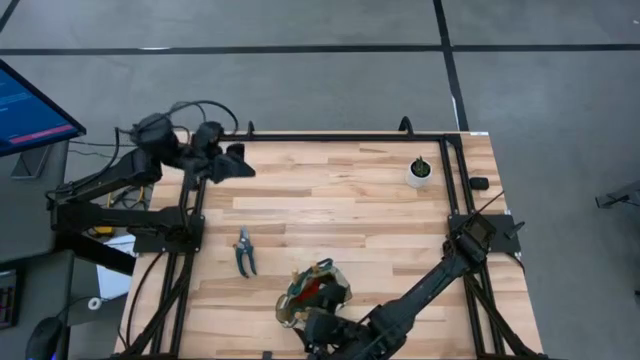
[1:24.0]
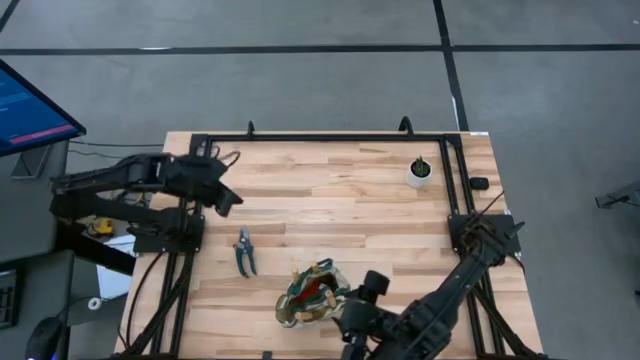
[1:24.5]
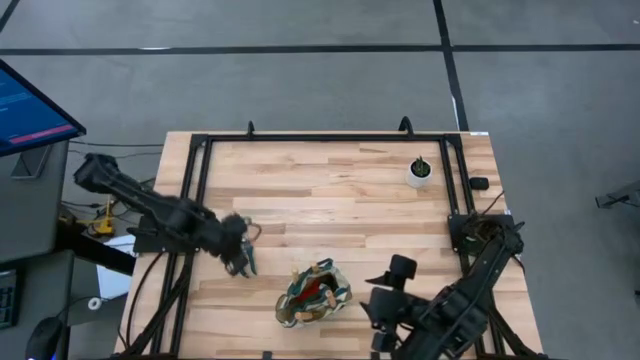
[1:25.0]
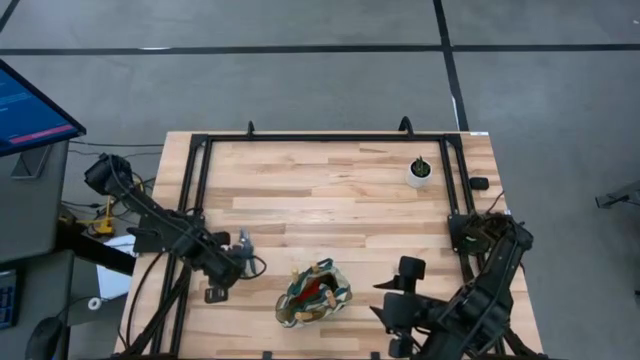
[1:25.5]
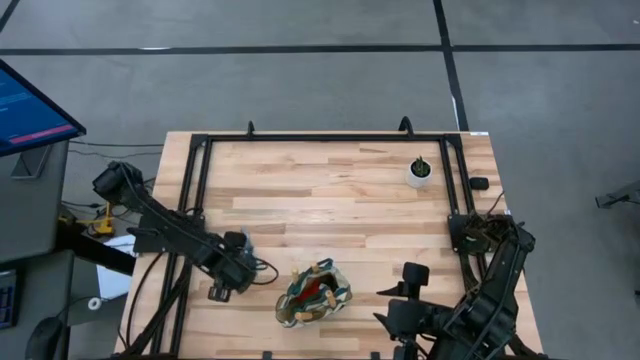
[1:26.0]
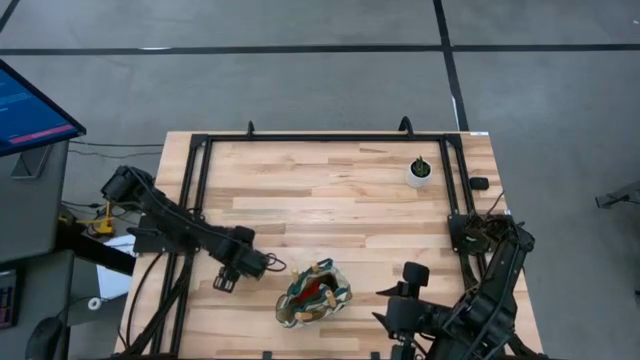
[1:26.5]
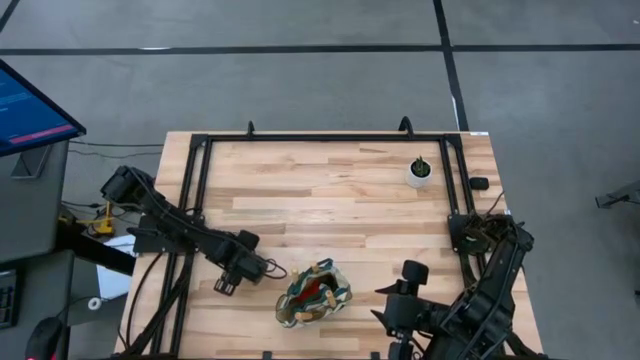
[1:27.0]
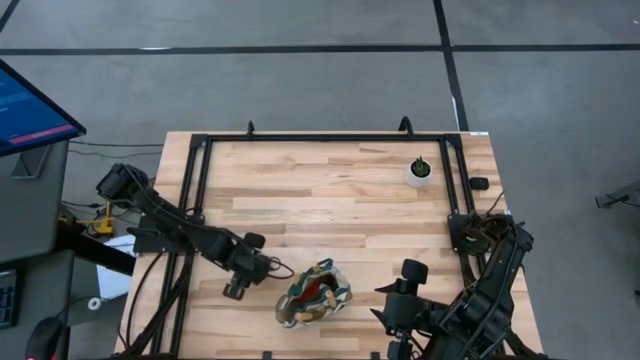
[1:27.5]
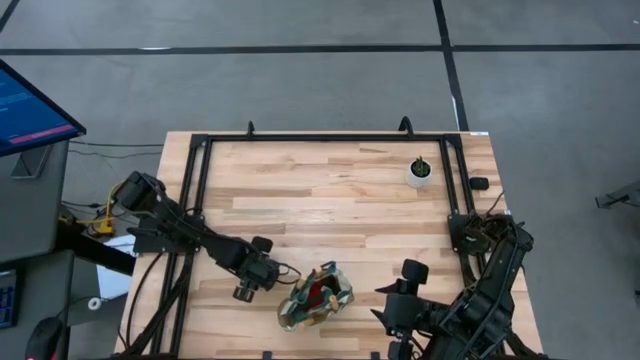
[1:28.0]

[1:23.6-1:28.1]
Task: Pick & Place Garden tools in Gardening bag
Put the green shear scissors into the gardening bag pocket

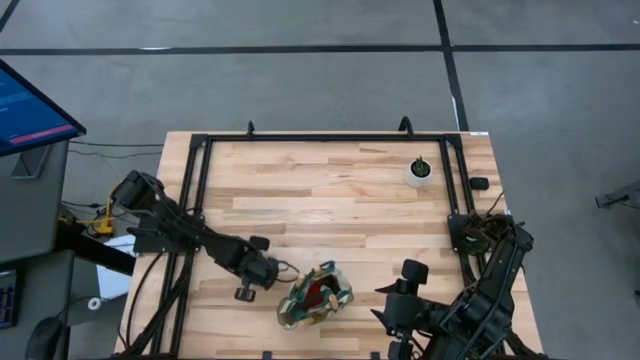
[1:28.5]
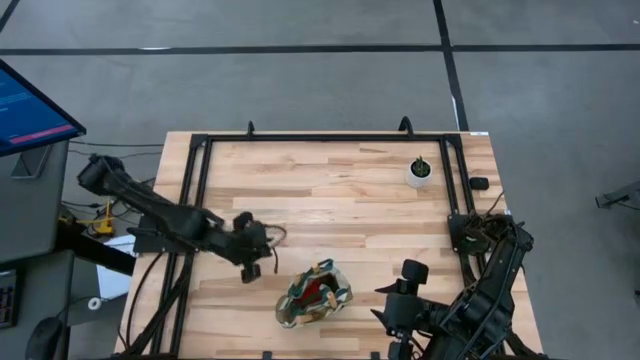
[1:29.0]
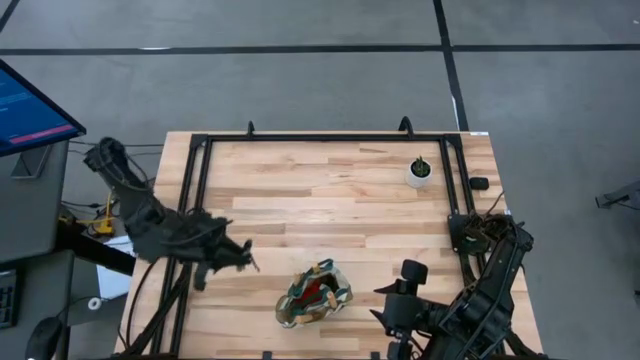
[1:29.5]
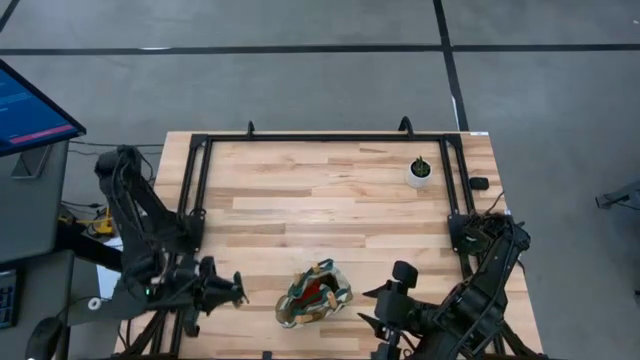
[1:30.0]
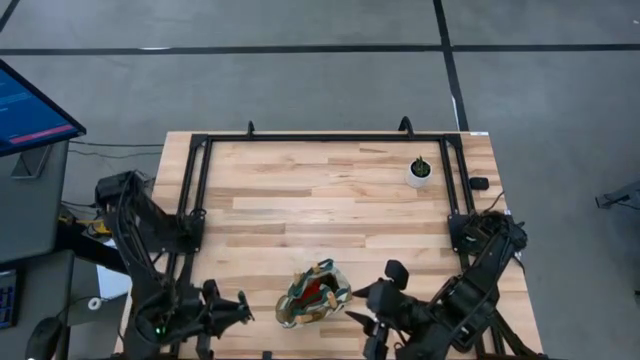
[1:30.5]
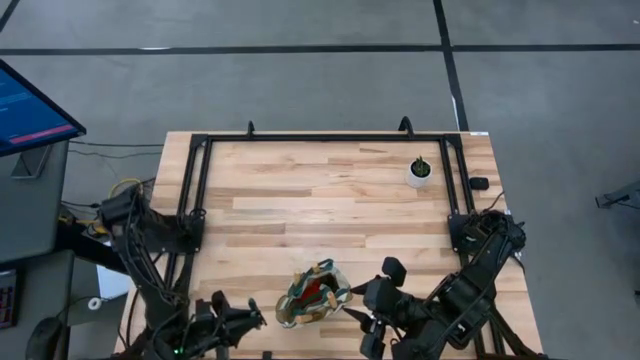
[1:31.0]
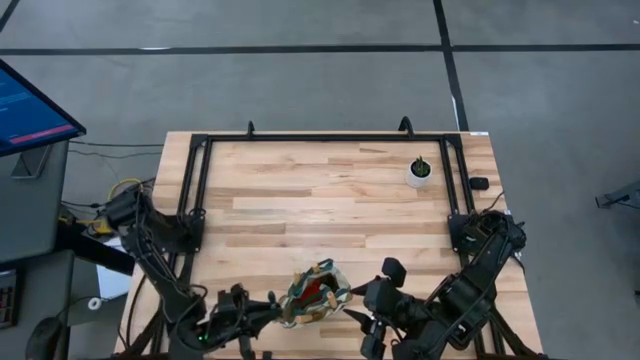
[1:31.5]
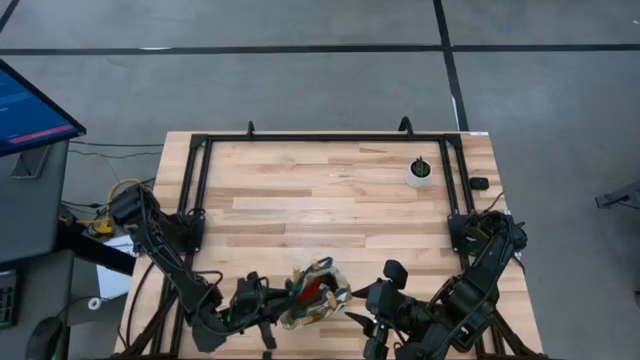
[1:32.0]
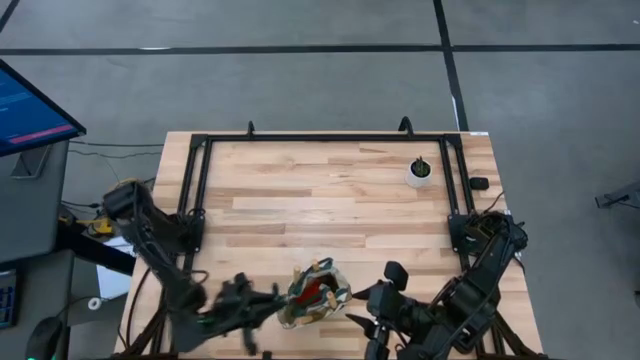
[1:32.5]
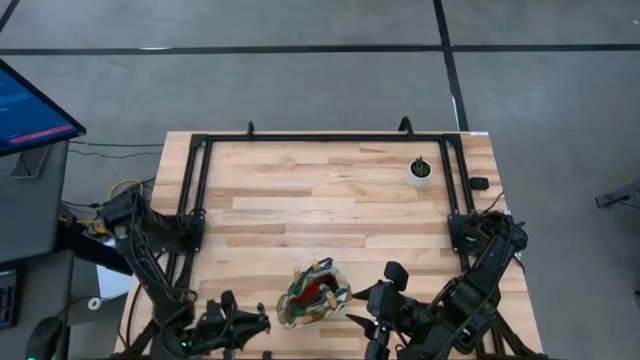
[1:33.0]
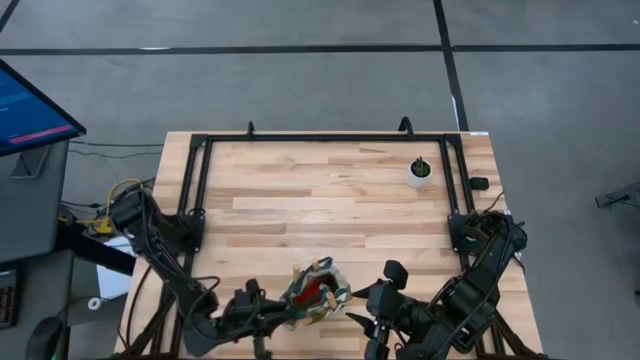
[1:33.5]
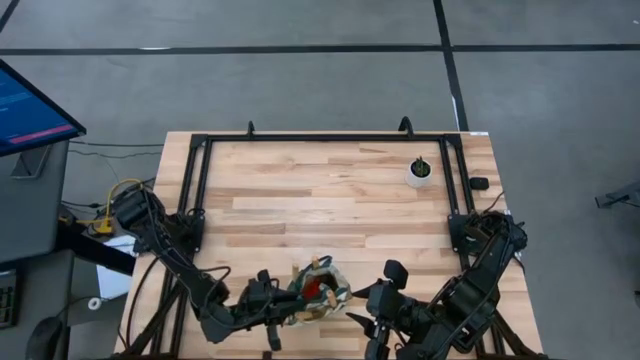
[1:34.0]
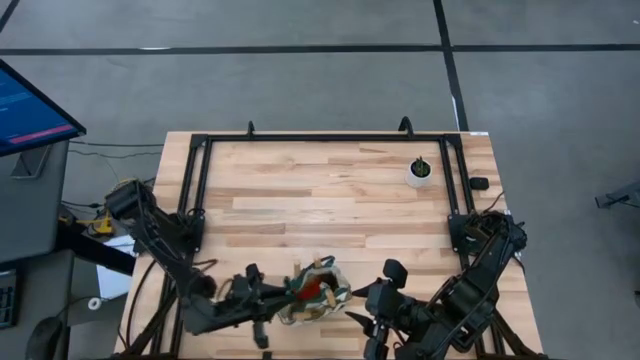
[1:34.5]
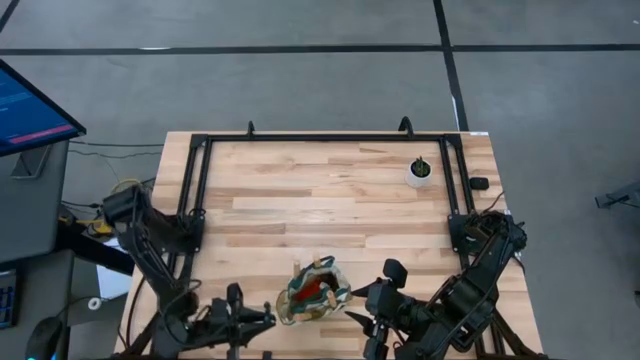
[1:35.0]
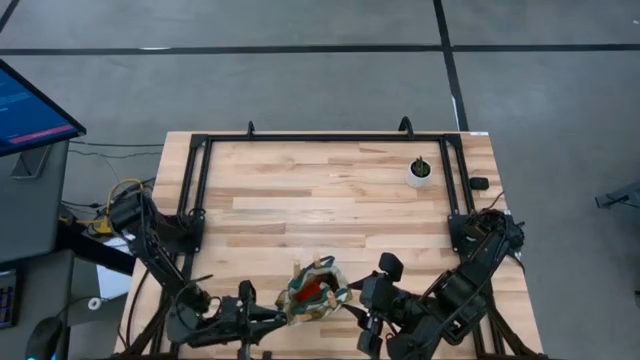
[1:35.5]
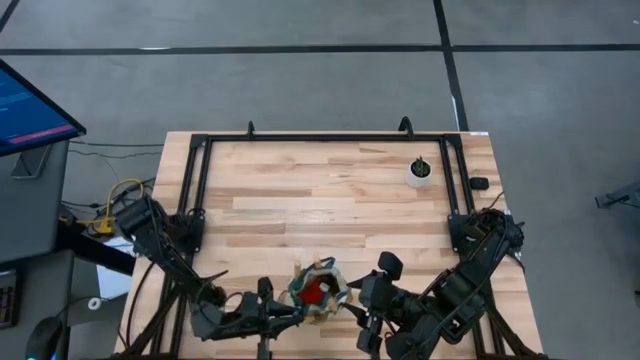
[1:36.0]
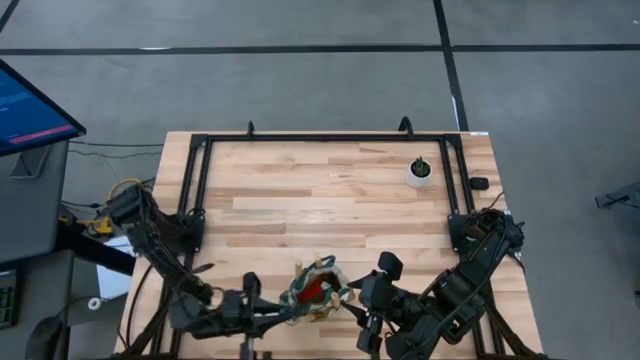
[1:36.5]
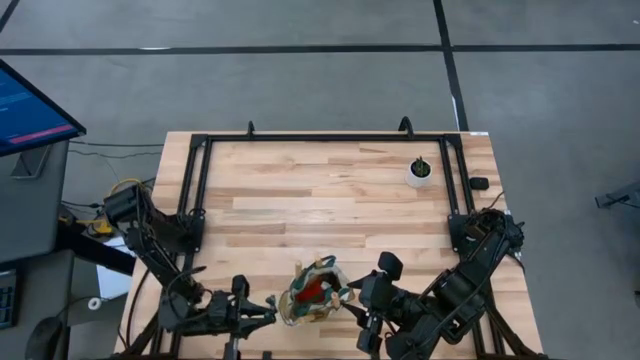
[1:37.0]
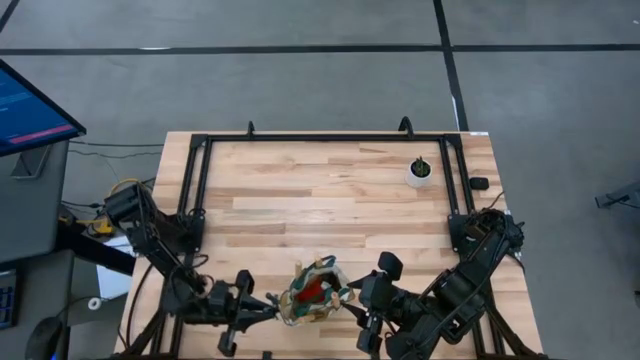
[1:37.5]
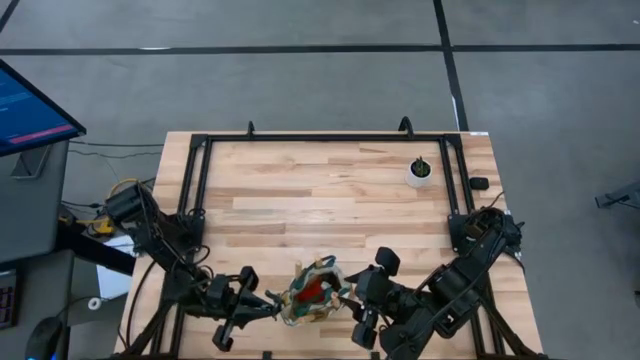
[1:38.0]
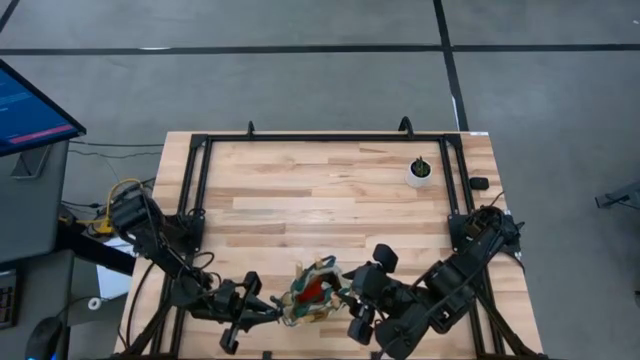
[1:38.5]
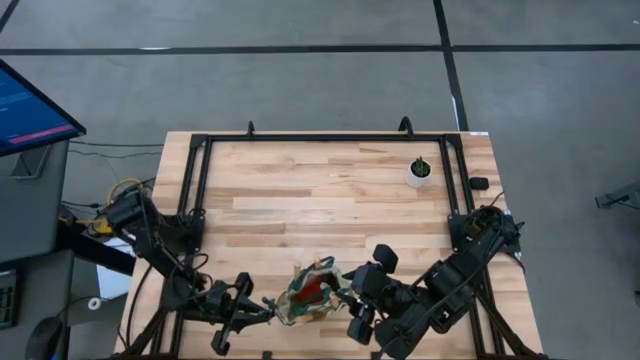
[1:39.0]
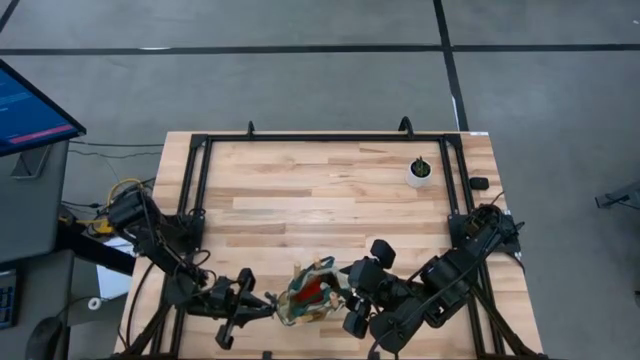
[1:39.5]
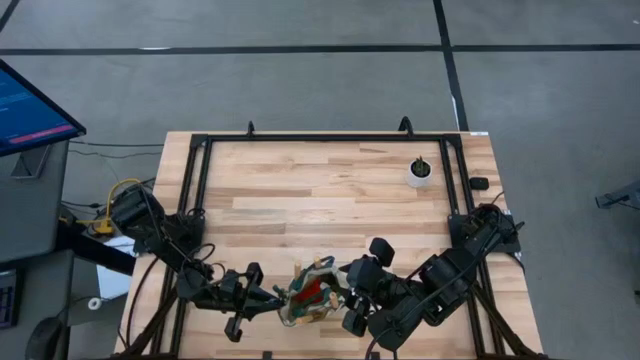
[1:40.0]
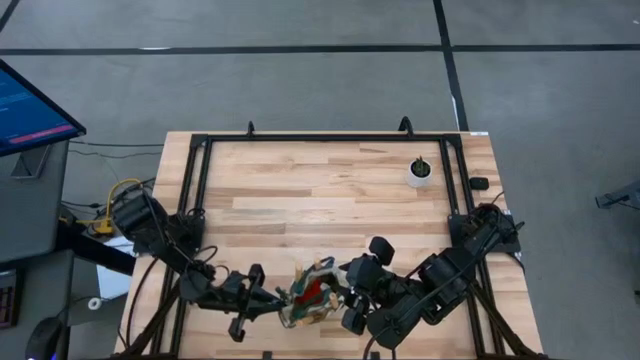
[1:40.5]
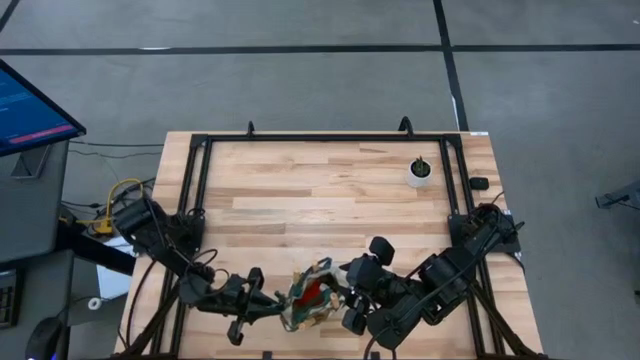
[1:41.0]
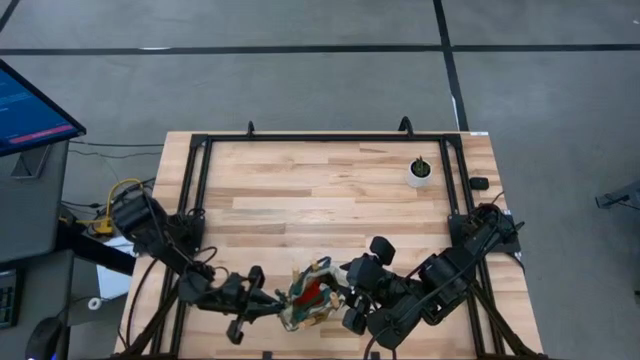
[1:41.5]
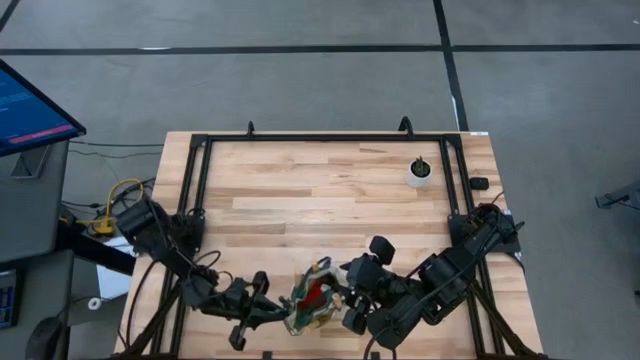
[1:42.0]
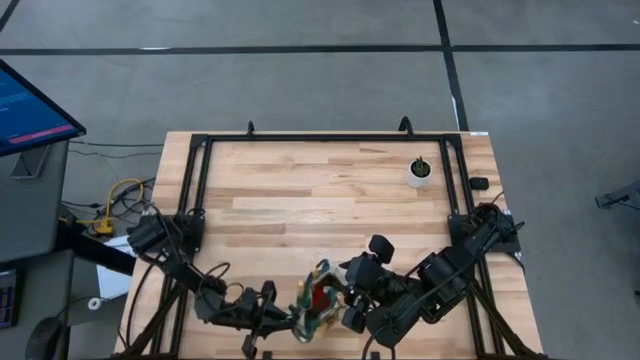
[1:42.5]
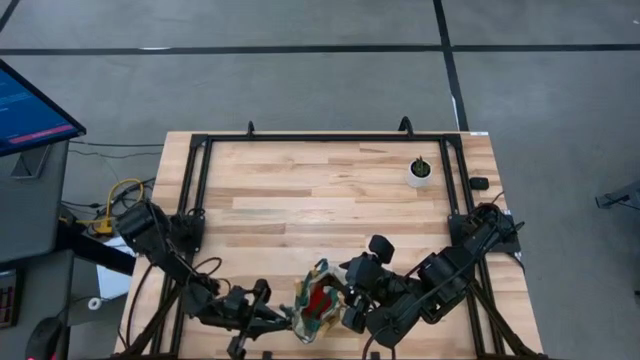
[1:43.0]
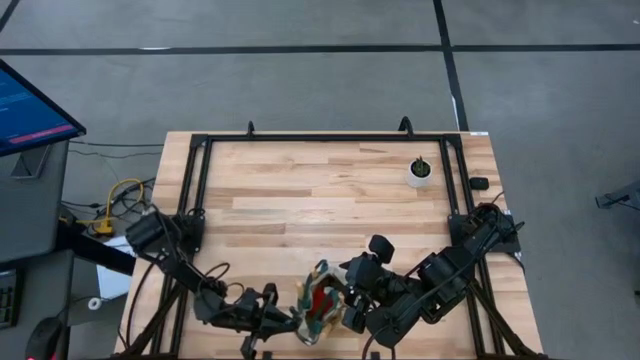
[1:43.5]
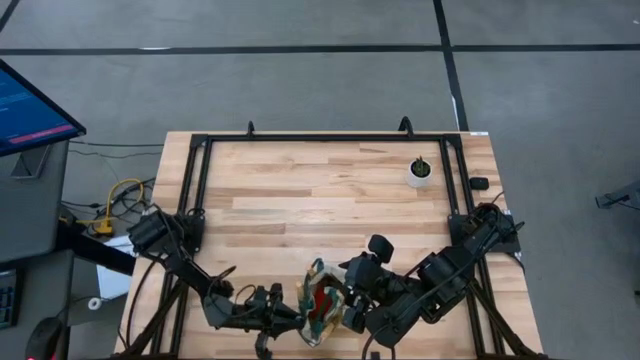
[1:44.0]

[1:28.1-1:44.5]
Put the green shear scissors into the gardening bag pocket

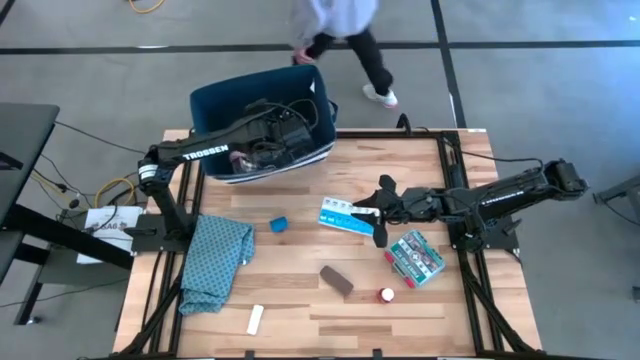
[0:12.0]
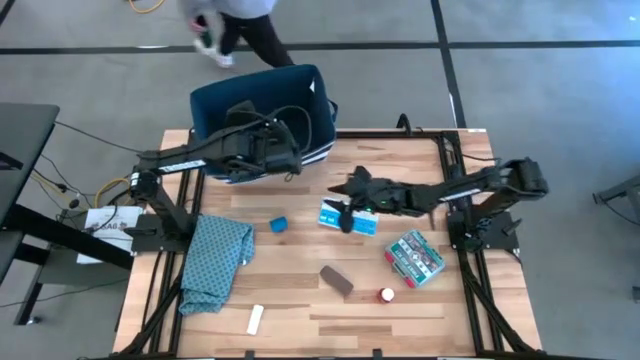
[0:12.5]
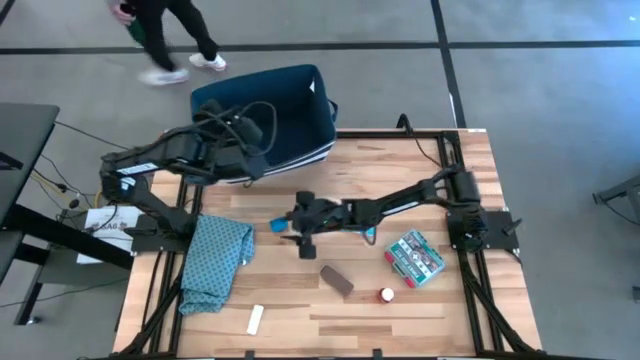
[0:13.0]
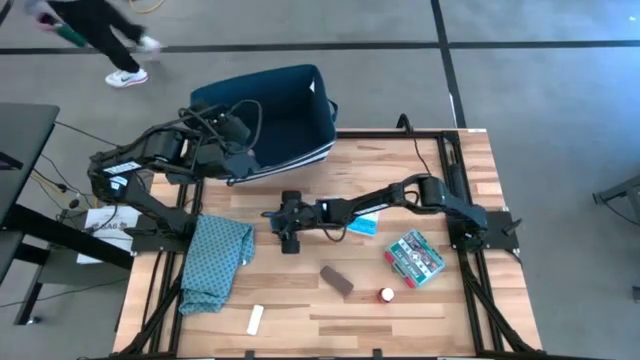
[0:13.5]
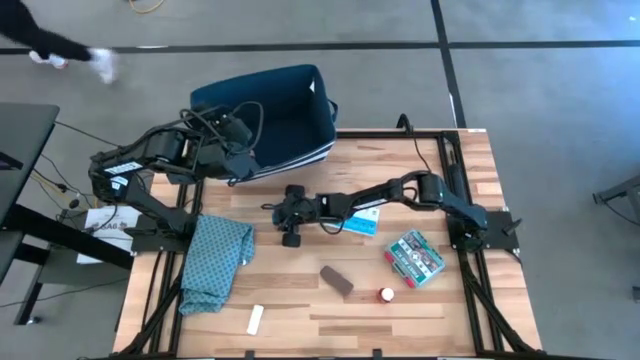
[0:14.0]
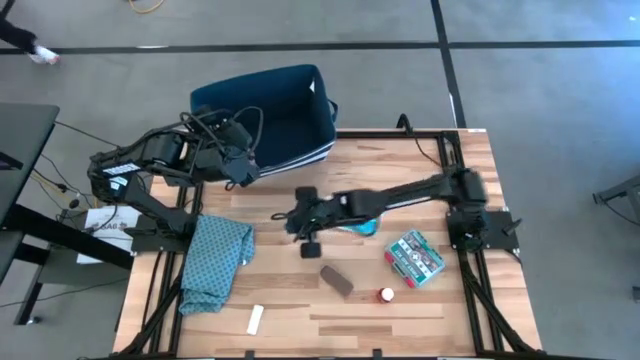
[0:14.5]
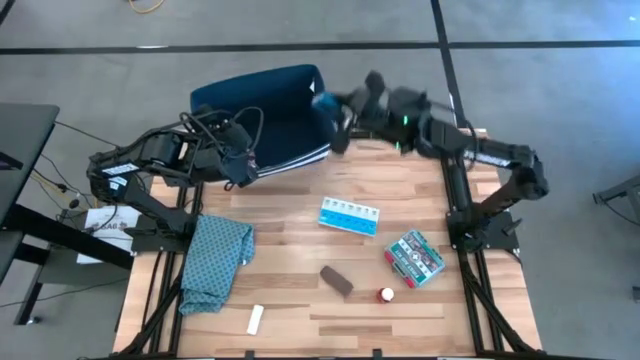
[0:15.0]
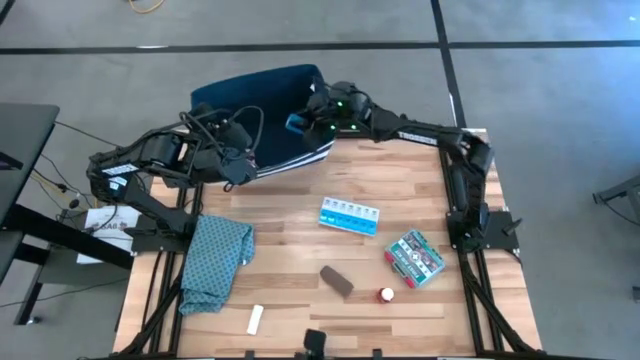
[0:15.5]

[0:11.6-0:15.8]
Task: Pick & place medical supplies in basket/bin
Put the blue bandage into the blue bin
